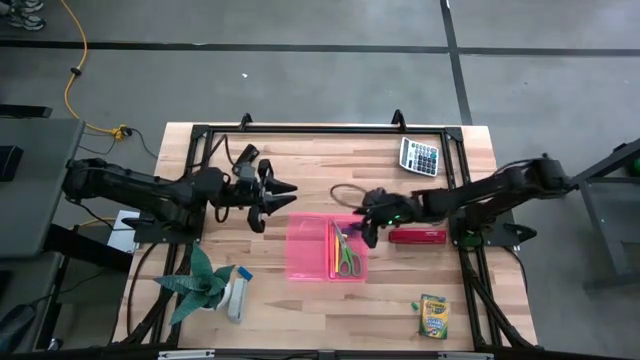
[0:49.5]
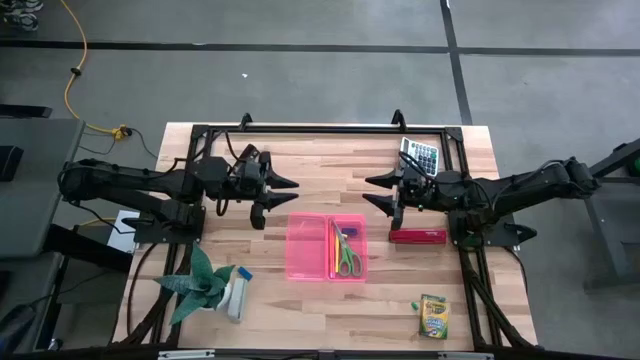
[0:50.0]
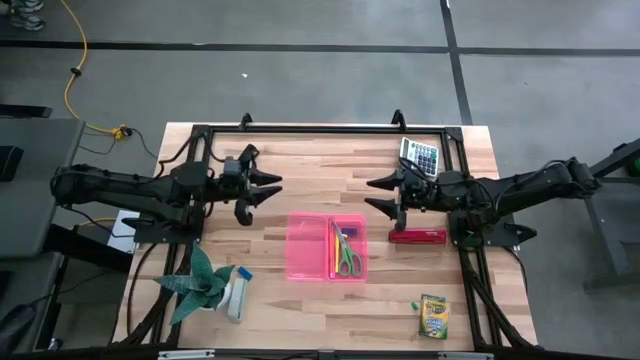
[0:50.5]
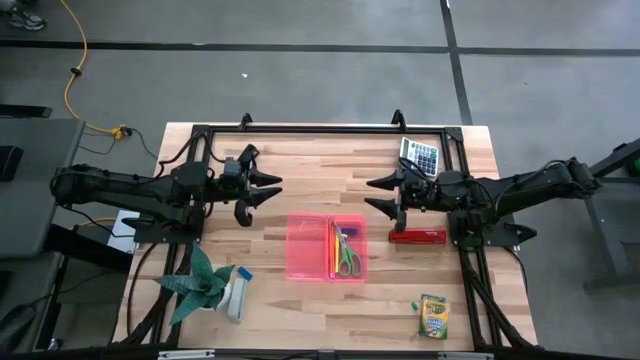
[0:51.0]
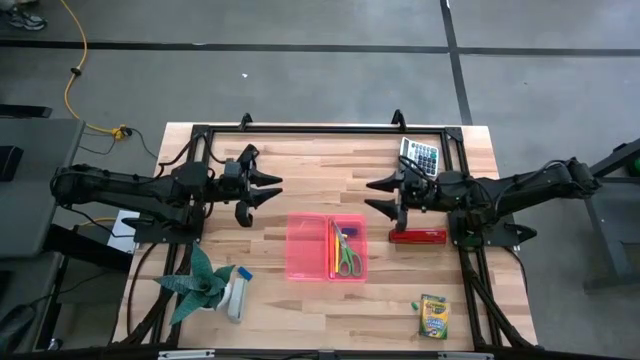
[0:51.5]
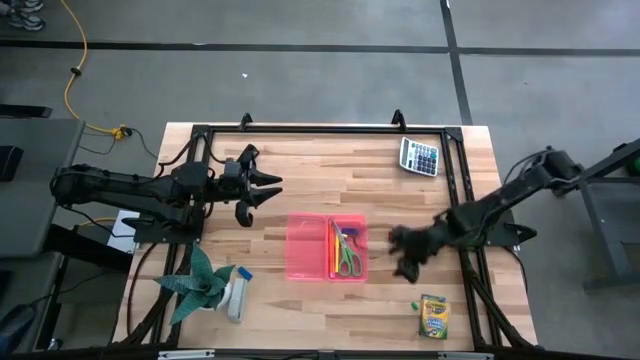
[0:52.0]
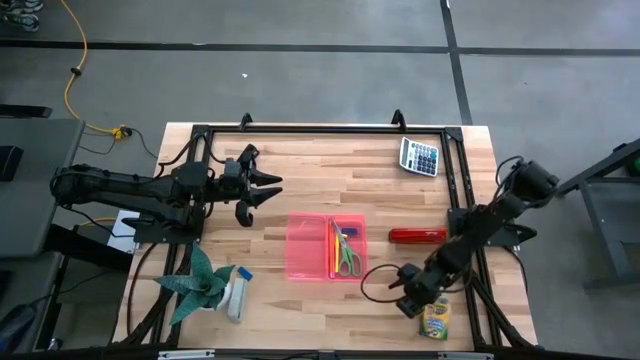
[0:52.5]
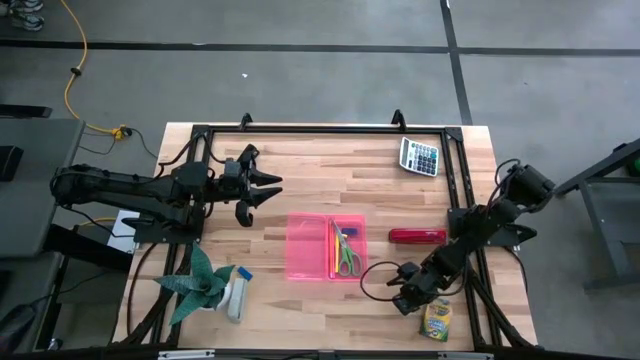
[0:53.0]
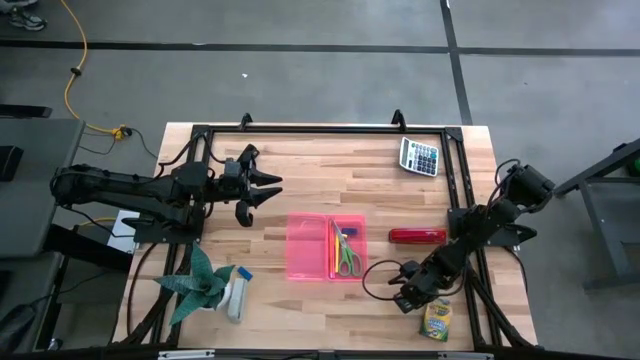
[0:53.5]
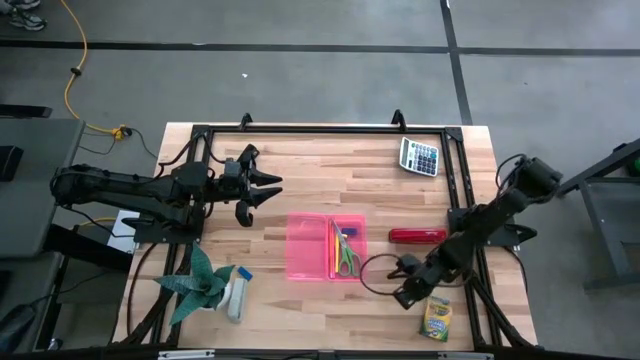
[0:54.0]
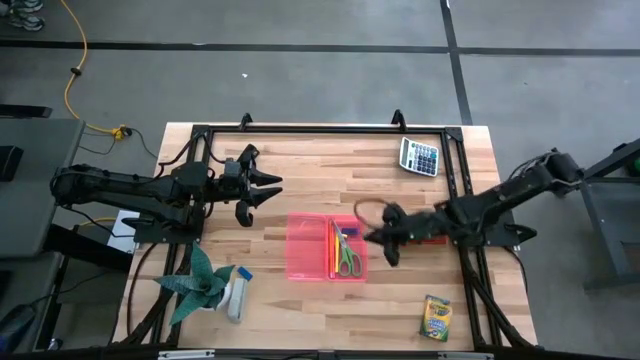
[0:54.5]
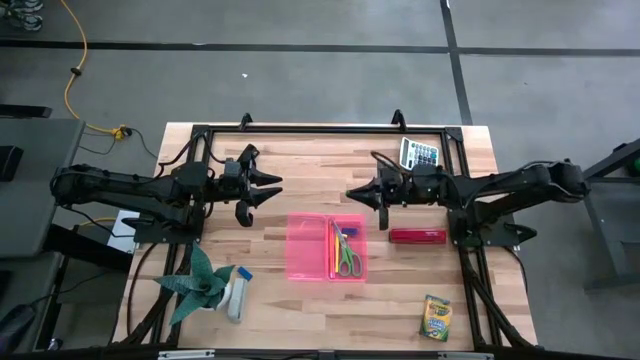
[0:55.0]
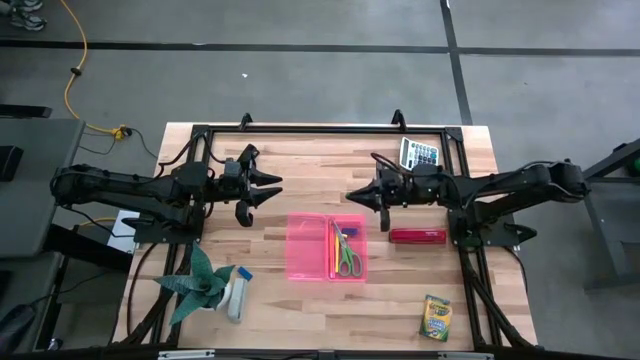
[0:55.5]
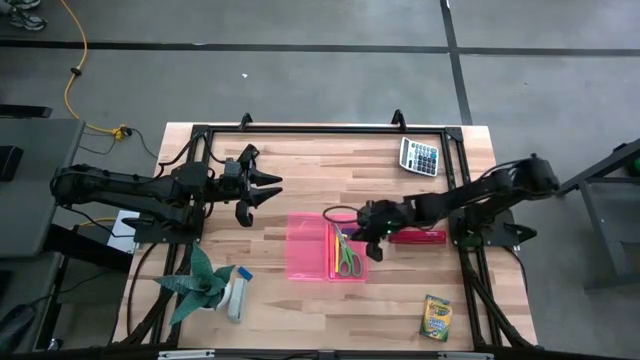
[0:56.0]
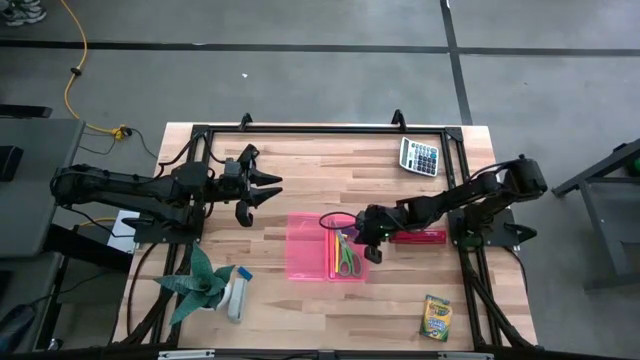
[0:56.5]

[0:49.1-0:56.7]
Task: Pack school essentials
Put the small green eraser into the pink supply box

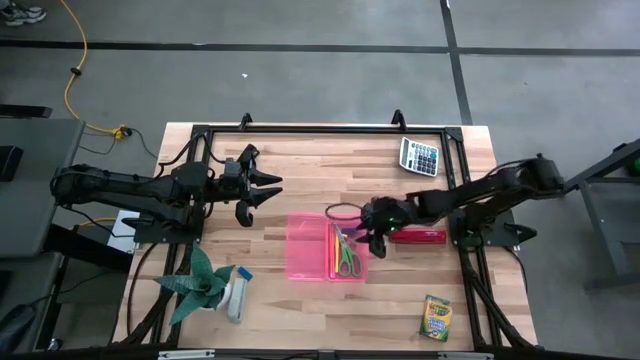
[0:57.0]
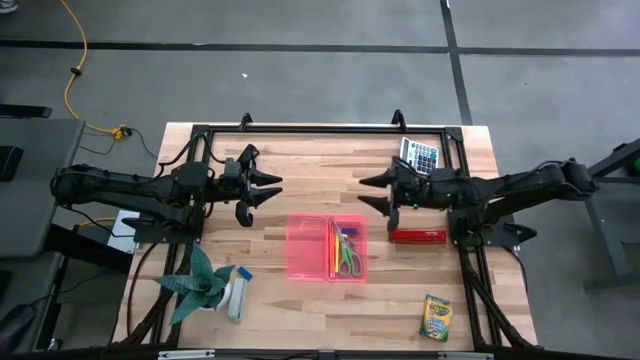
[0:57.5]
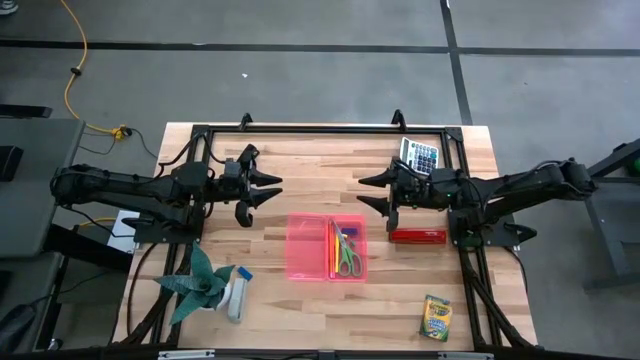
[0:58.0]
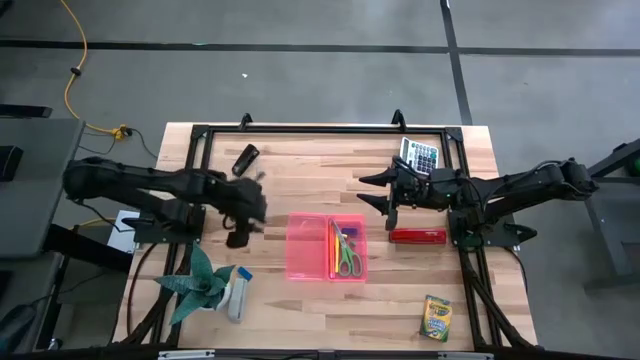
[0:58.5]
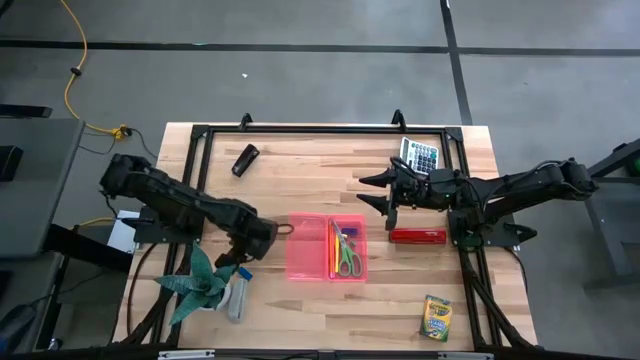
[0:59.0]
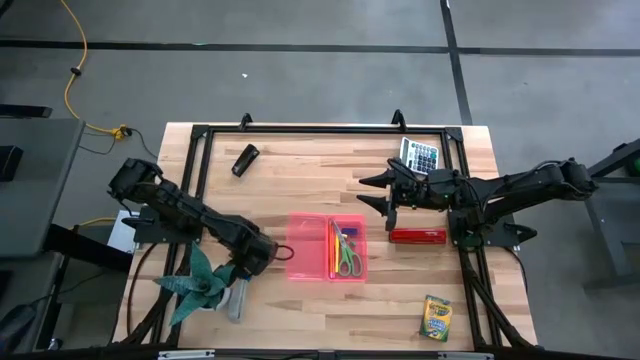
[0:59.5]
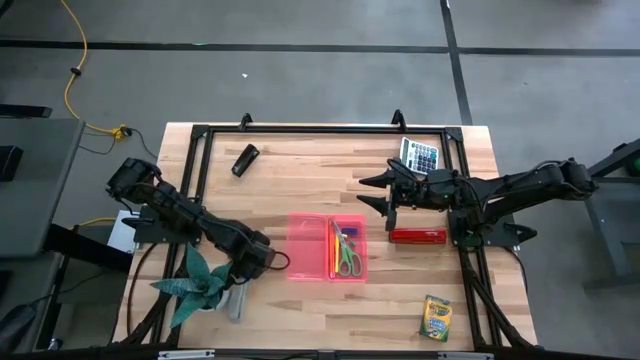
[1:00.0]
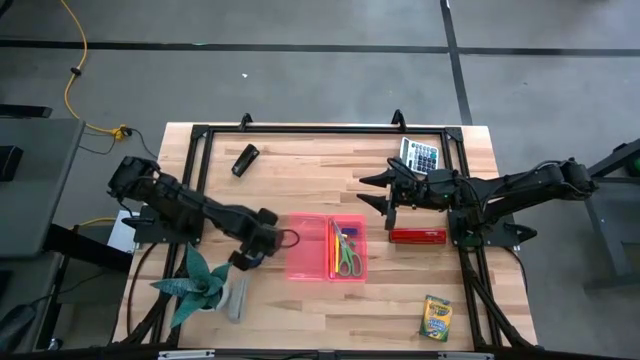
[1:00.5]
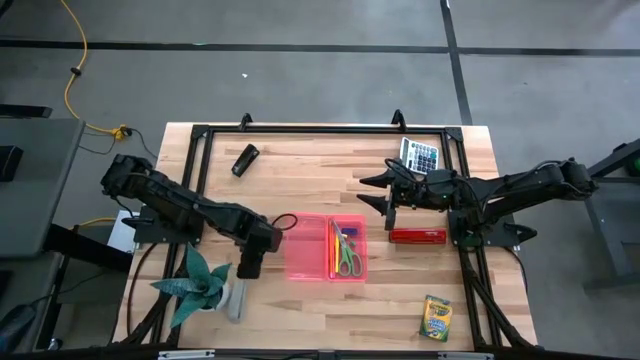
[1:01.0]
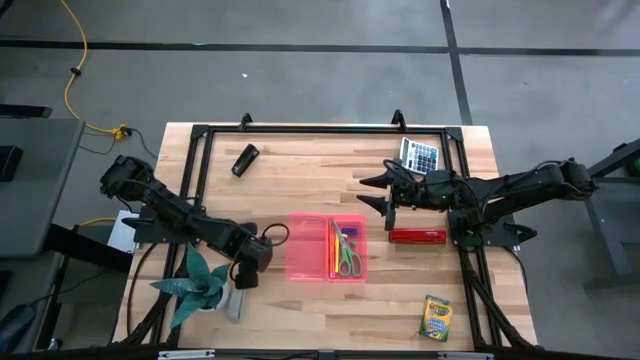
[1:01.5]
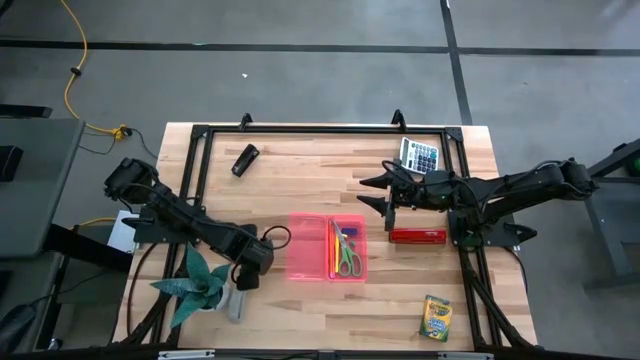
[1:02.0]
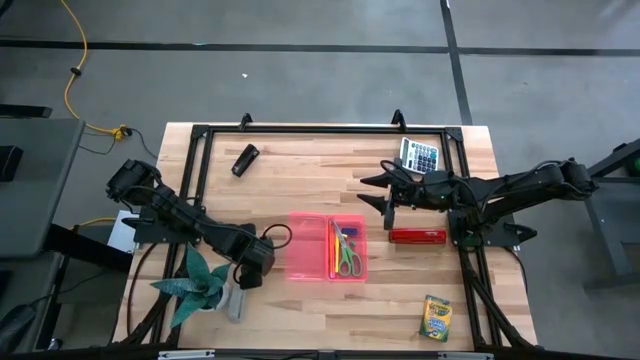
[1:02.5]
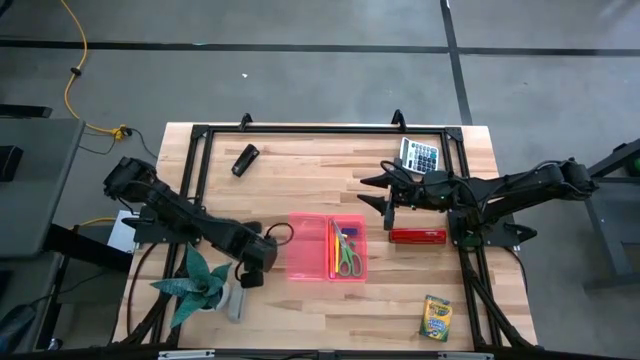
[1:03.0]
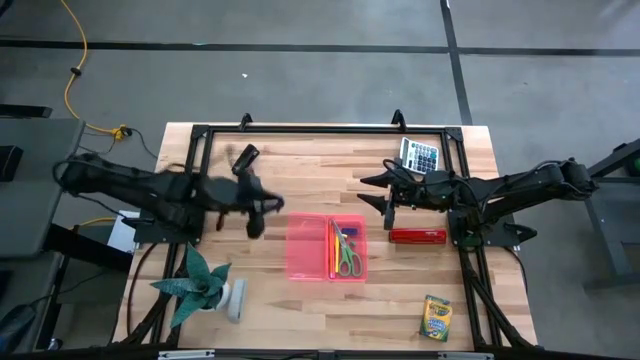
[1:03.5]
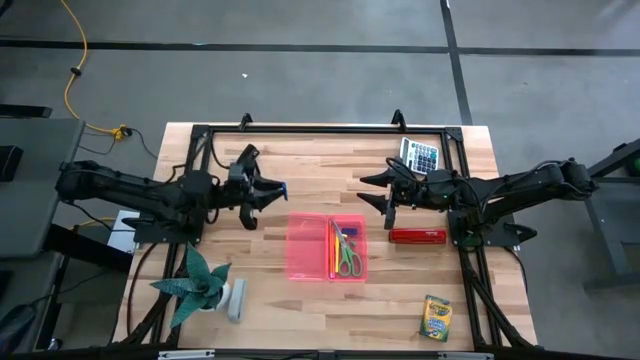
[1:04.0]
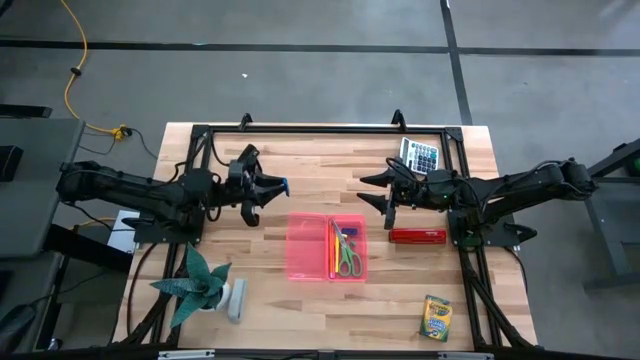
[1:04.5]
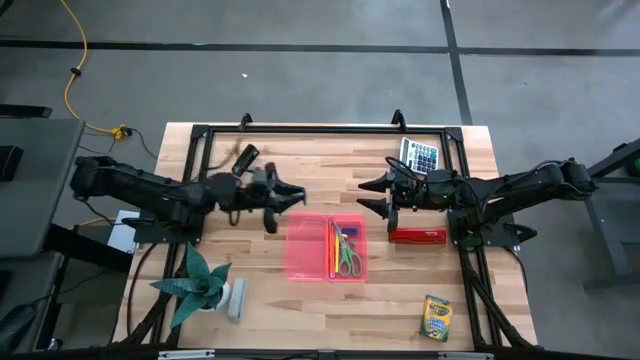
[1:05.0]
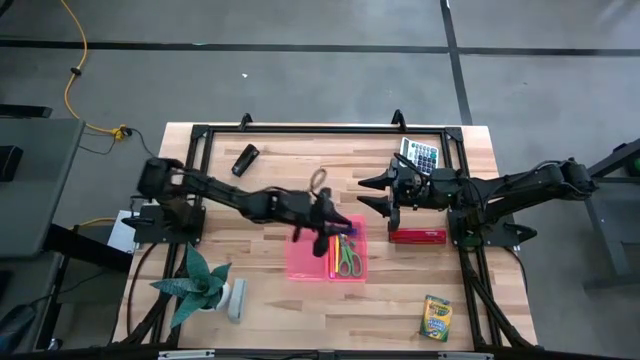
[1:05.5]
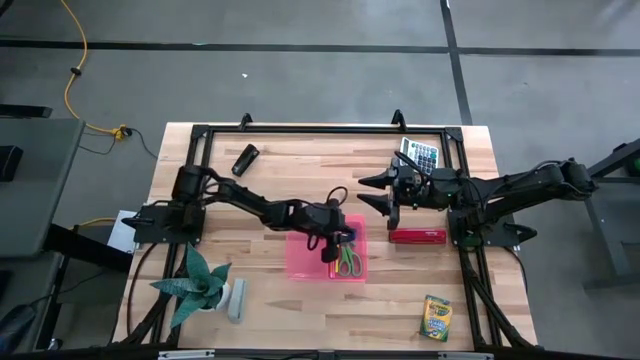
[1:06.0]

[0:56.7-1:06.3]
Put the blue eraser into the pink supply box

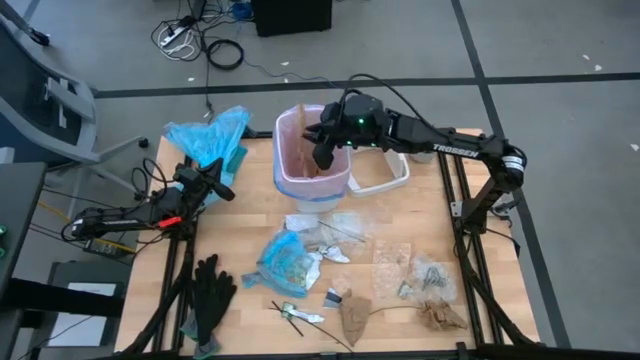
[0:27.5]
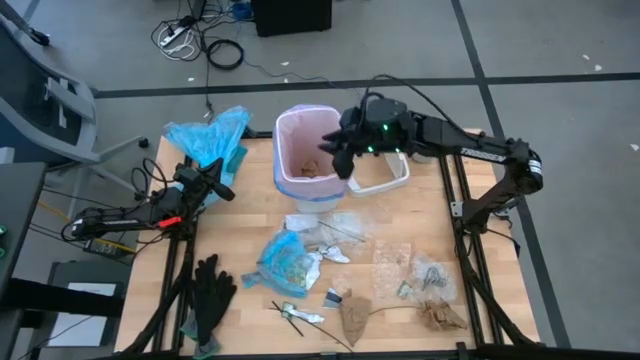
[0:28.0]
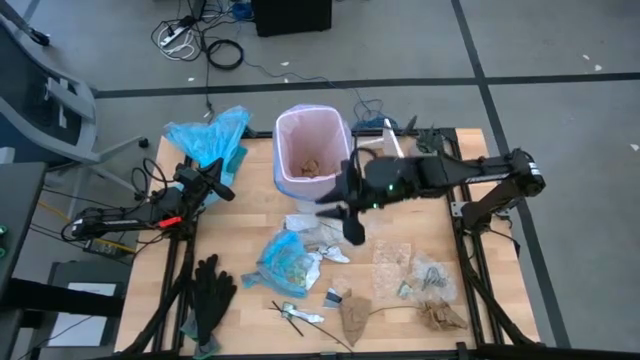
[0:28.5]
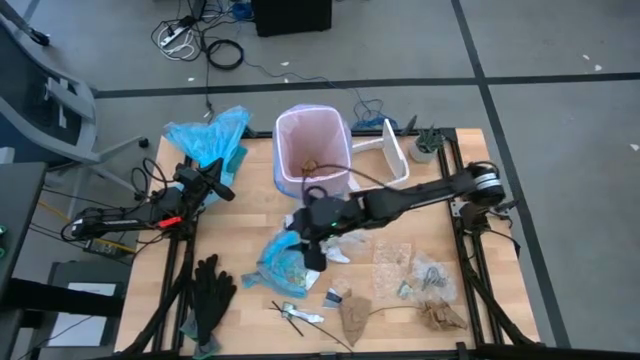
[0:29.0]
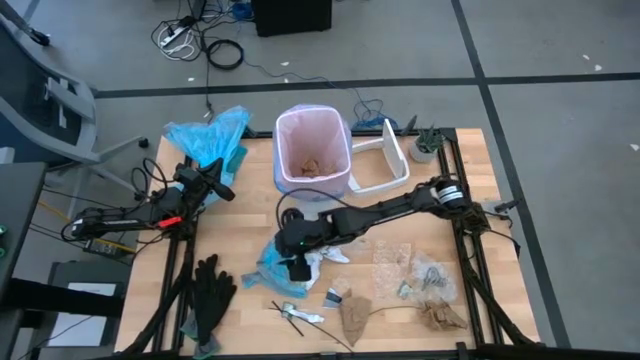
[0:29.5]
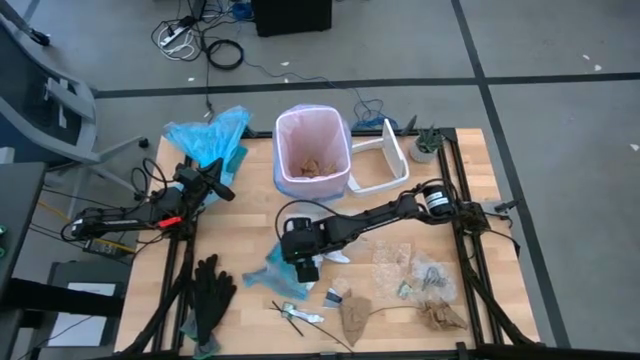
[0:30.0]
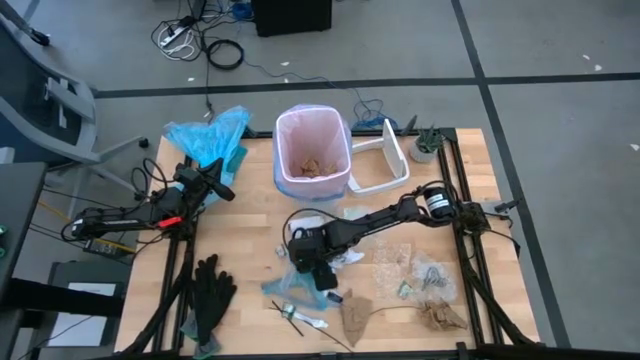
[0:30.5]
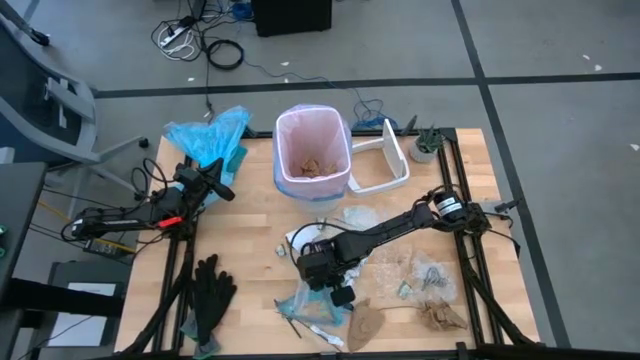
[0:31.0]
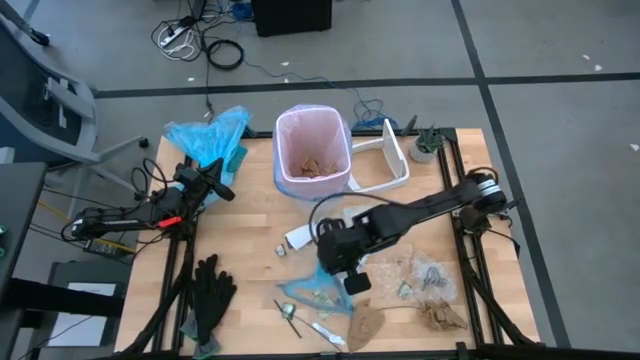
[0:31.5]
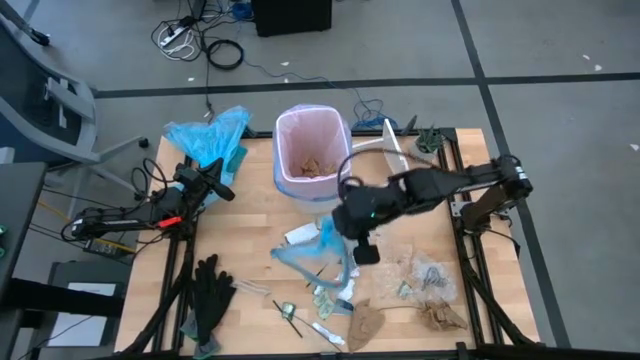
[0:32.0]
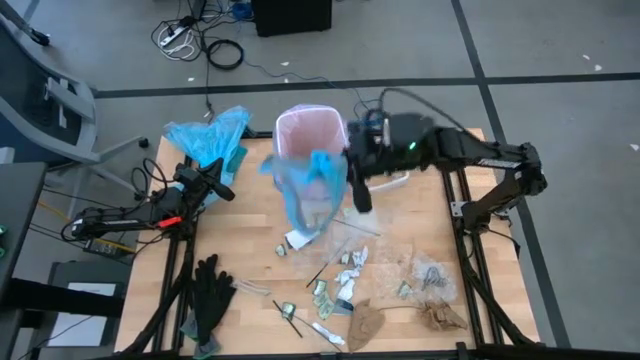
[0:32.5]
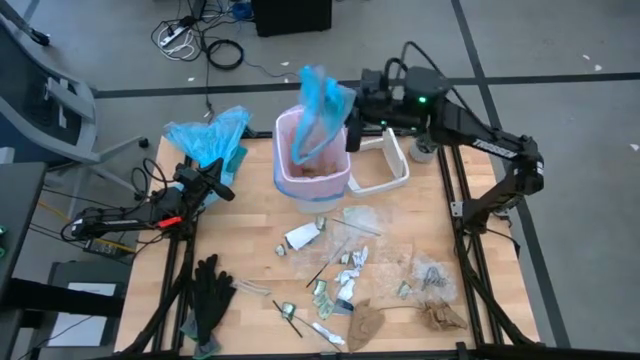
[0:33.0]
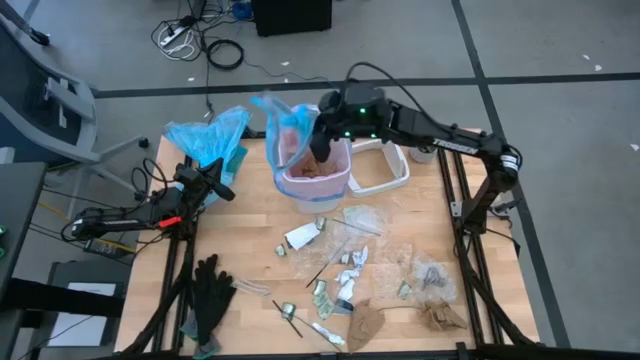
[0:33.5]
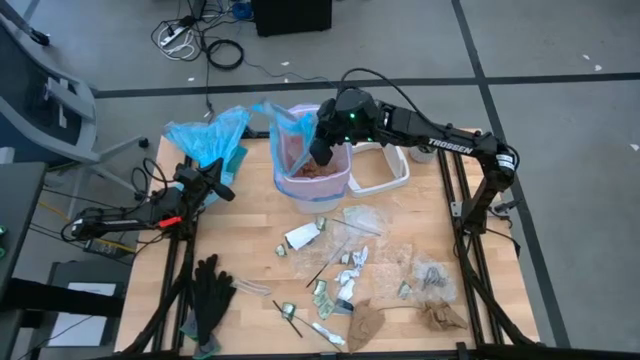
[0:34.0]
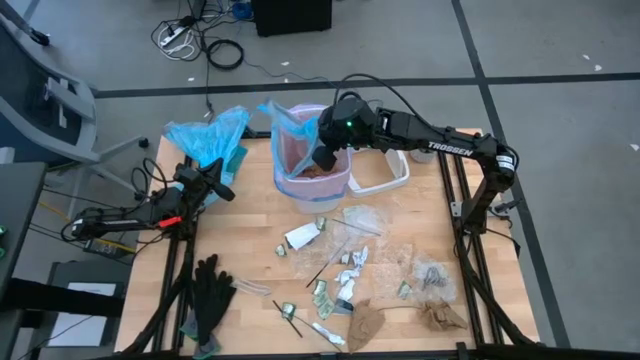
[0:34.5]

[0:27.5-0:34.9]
Task: place trash/remove bag and relplace
Put the blue plastic cellophane into the trash bin
